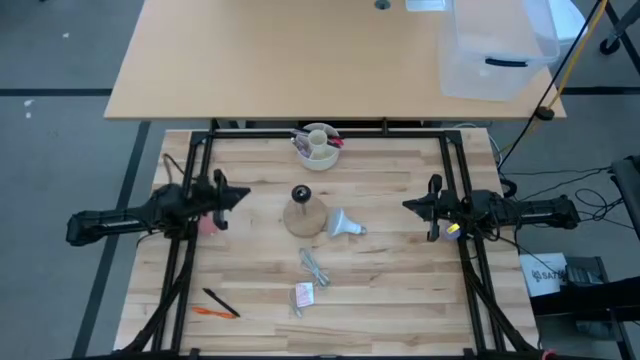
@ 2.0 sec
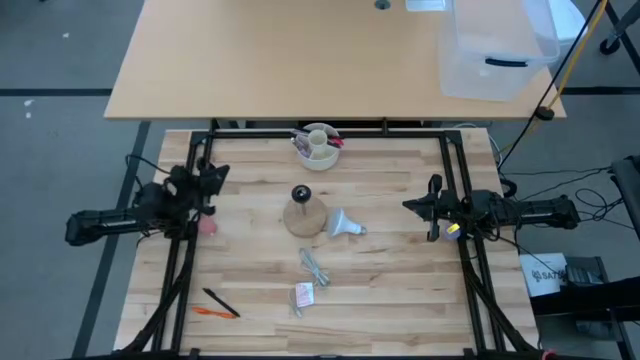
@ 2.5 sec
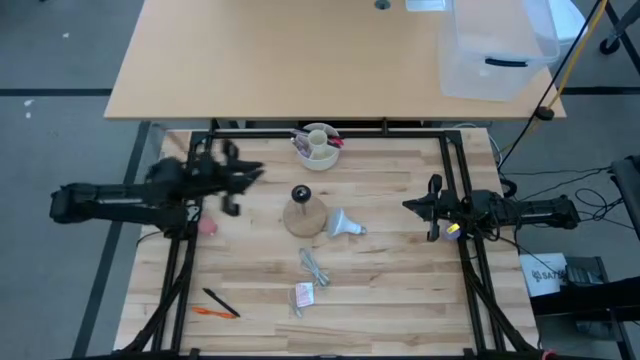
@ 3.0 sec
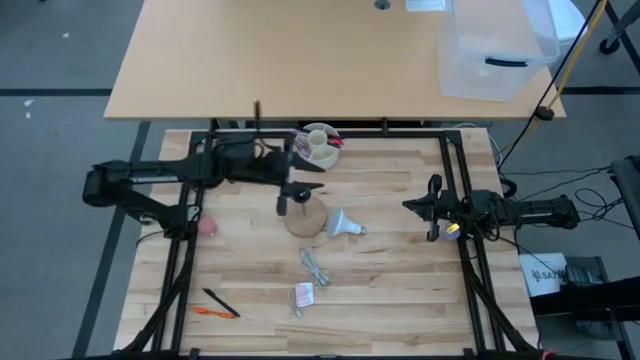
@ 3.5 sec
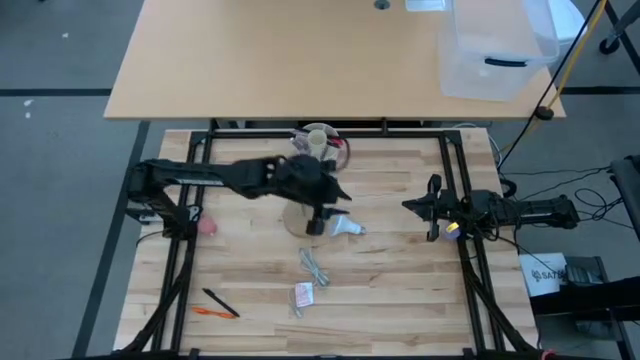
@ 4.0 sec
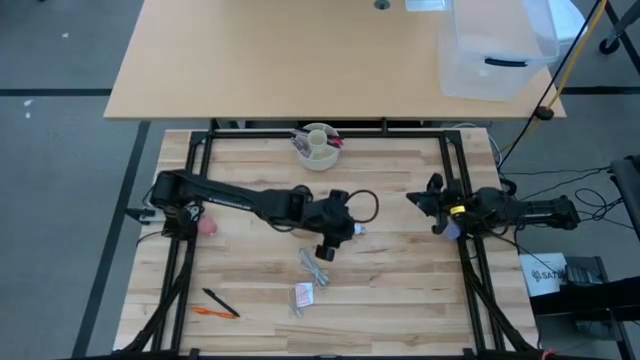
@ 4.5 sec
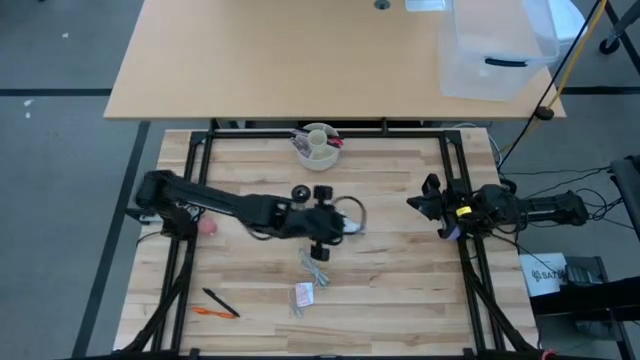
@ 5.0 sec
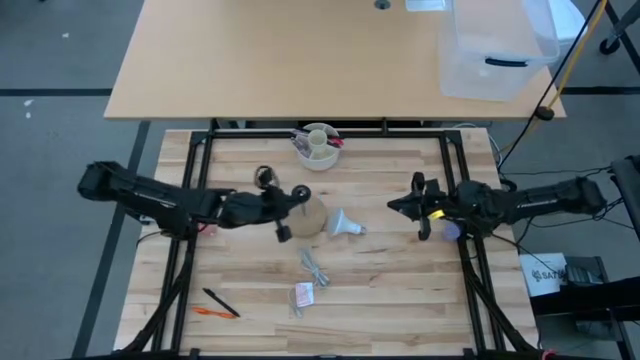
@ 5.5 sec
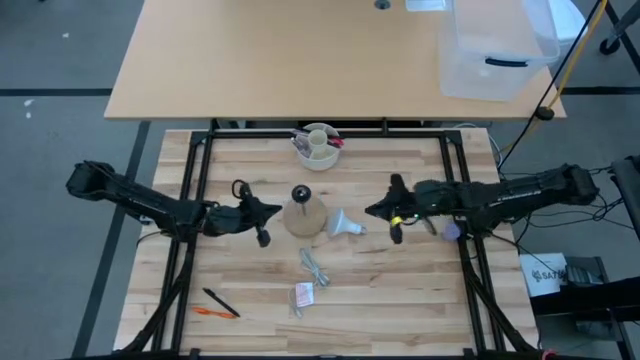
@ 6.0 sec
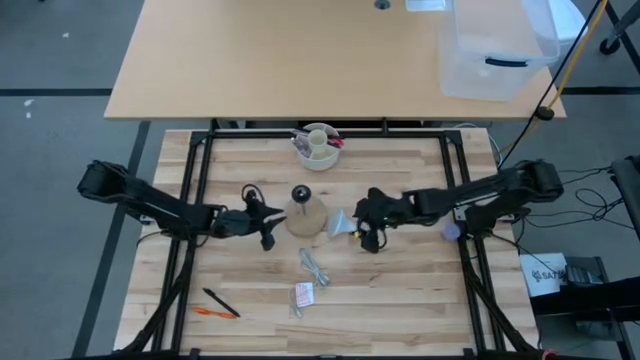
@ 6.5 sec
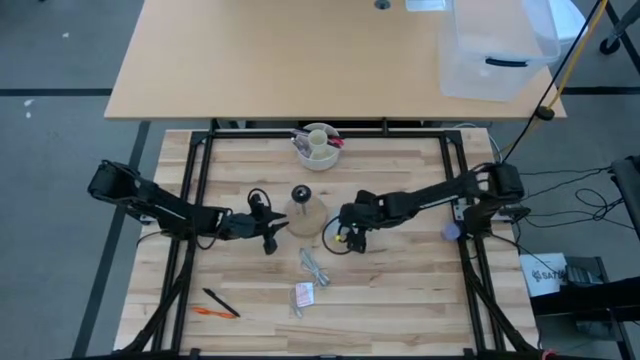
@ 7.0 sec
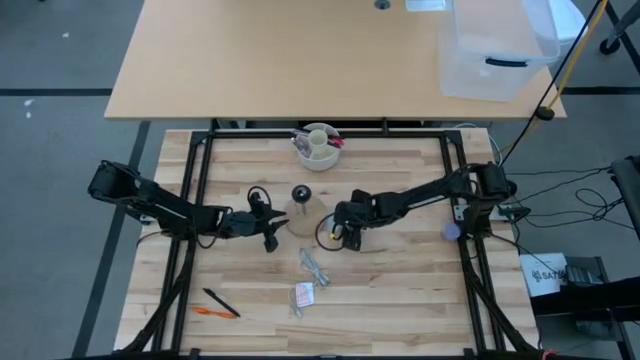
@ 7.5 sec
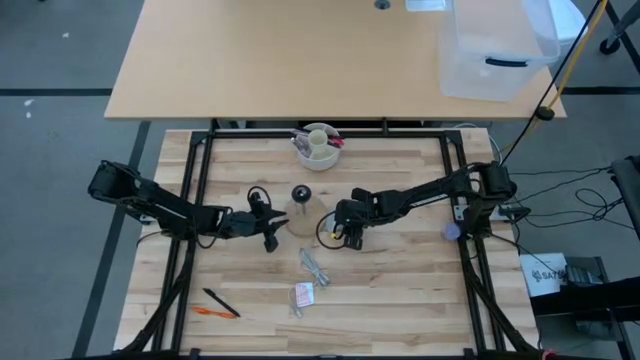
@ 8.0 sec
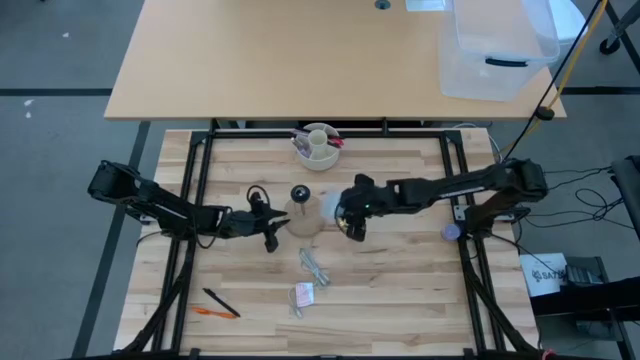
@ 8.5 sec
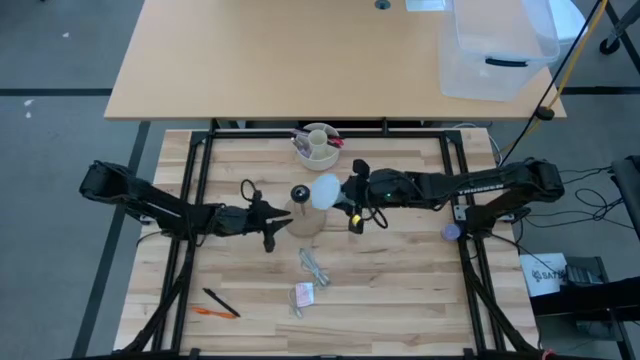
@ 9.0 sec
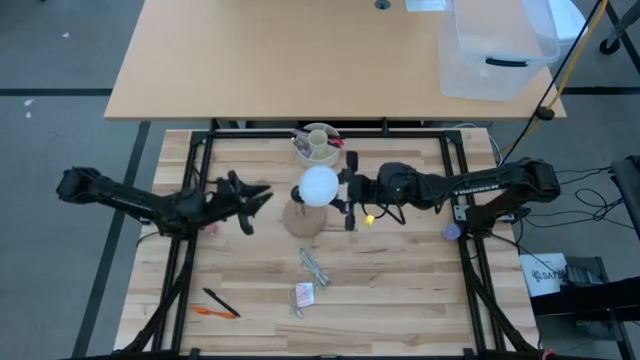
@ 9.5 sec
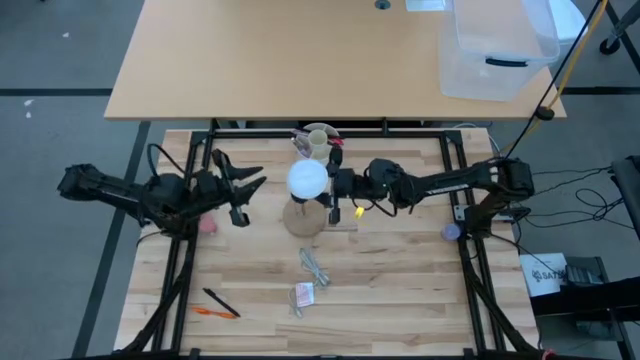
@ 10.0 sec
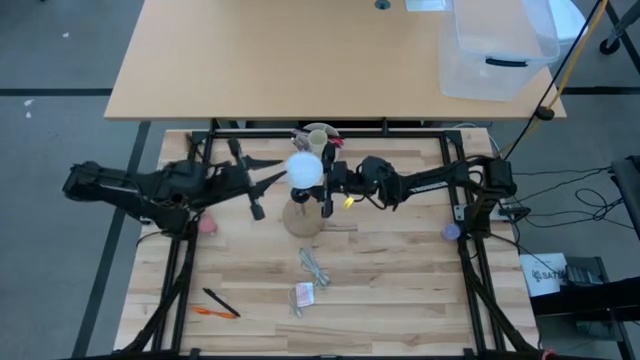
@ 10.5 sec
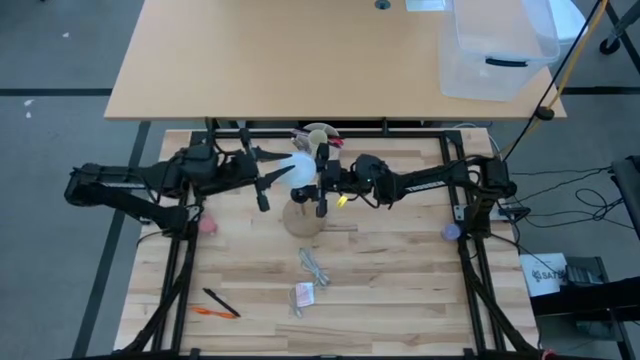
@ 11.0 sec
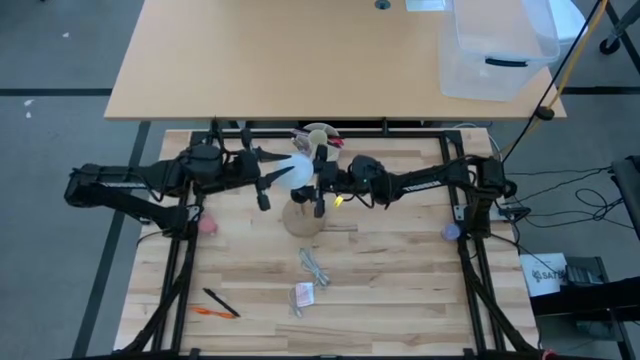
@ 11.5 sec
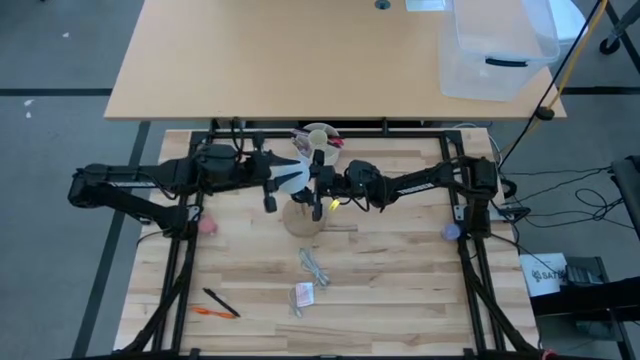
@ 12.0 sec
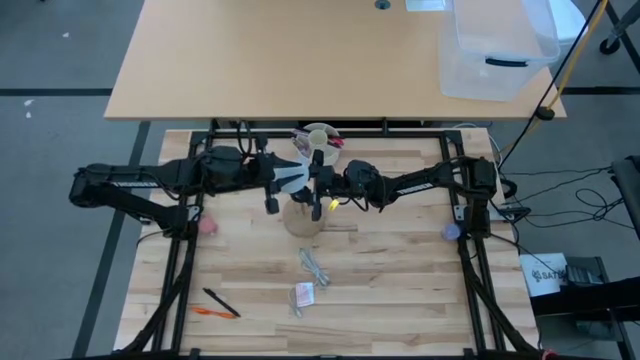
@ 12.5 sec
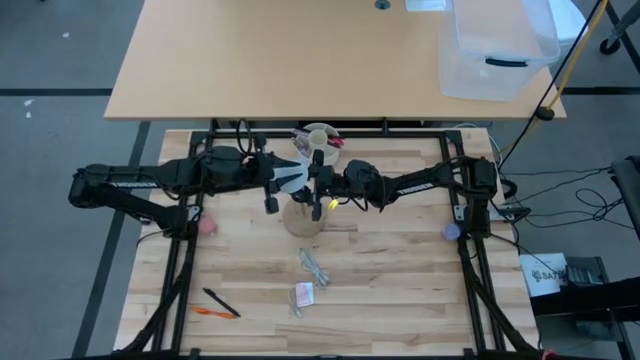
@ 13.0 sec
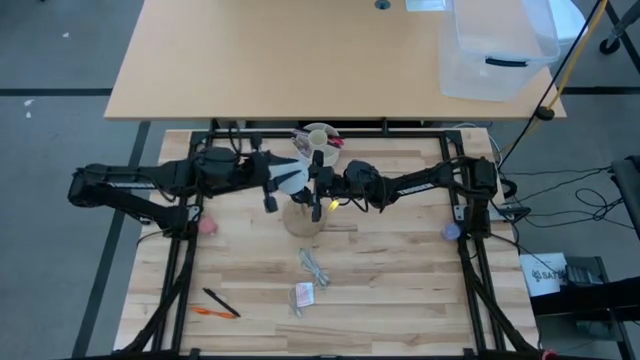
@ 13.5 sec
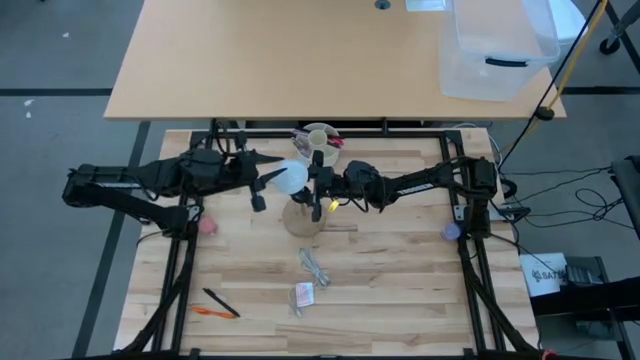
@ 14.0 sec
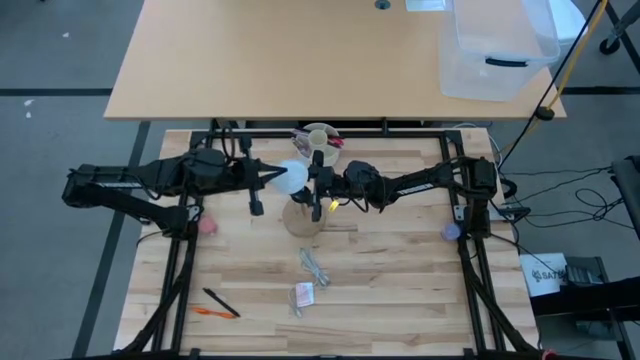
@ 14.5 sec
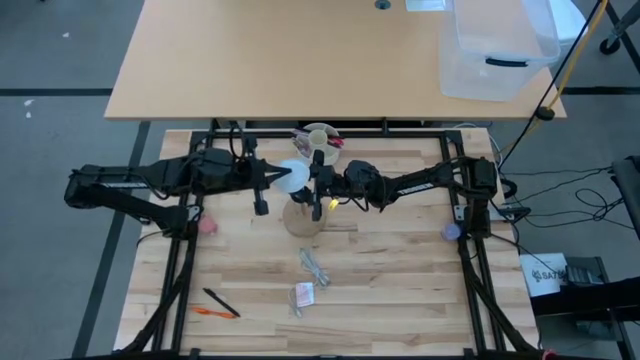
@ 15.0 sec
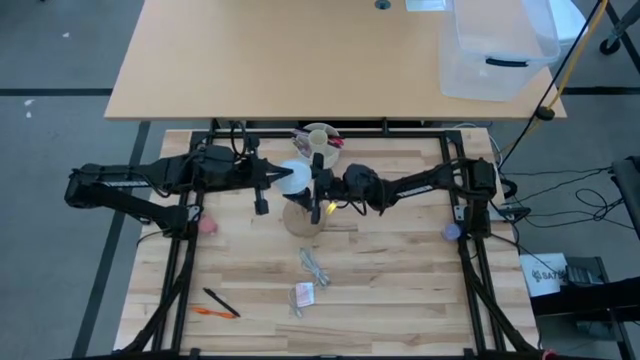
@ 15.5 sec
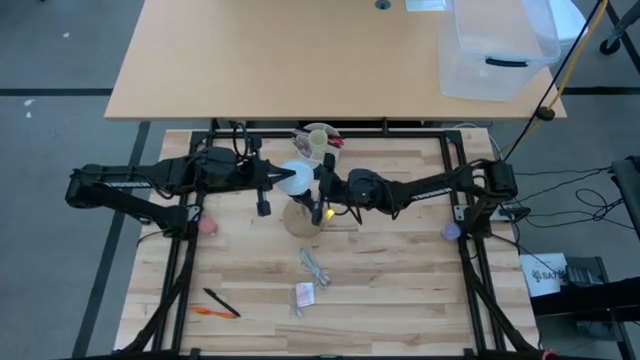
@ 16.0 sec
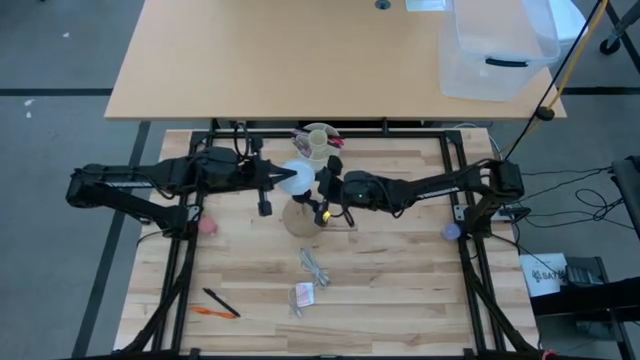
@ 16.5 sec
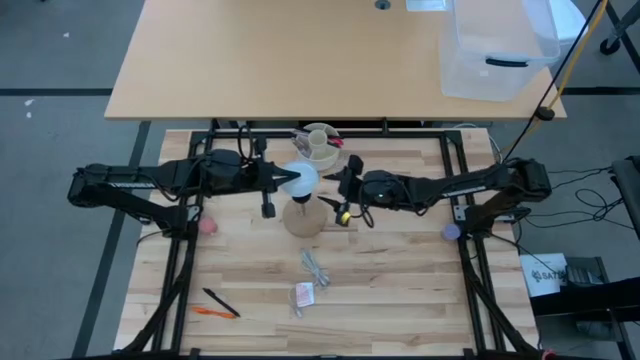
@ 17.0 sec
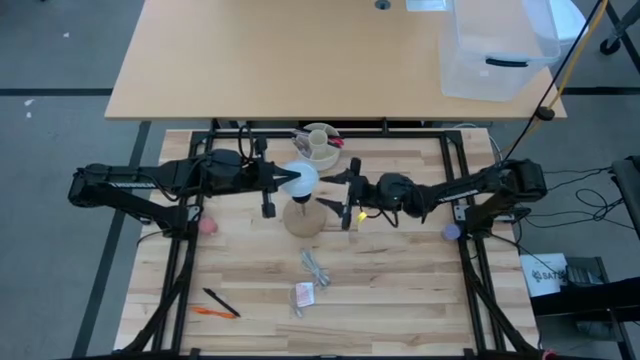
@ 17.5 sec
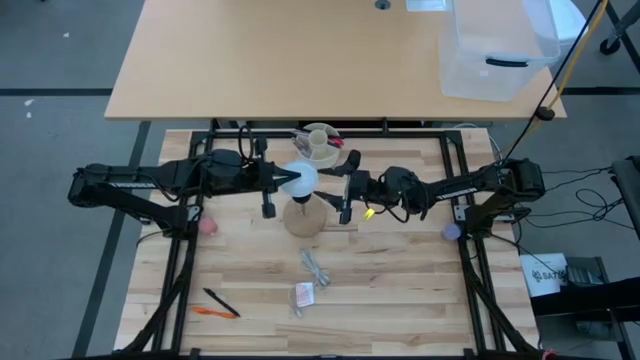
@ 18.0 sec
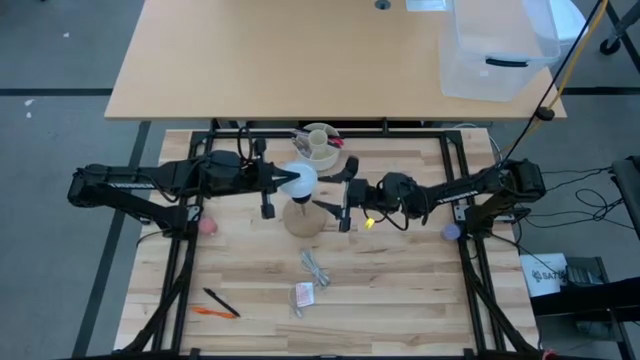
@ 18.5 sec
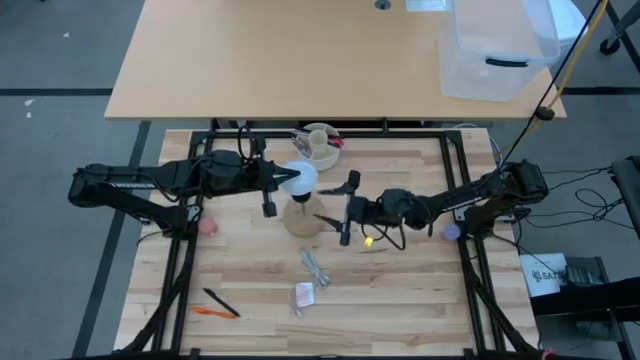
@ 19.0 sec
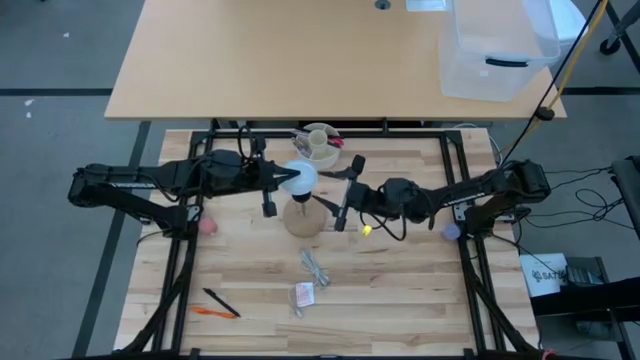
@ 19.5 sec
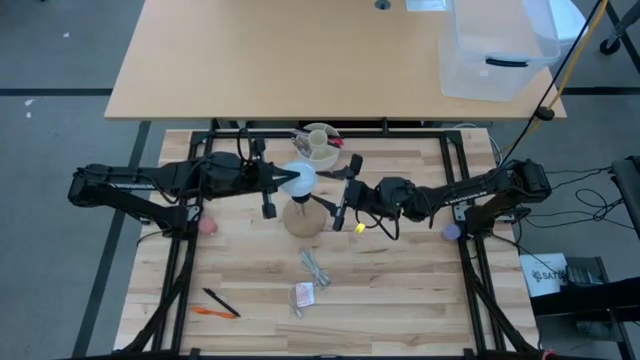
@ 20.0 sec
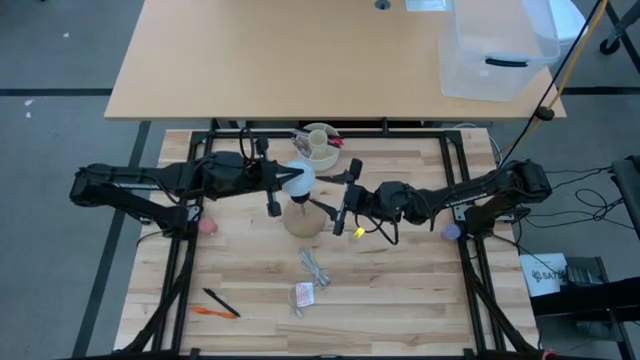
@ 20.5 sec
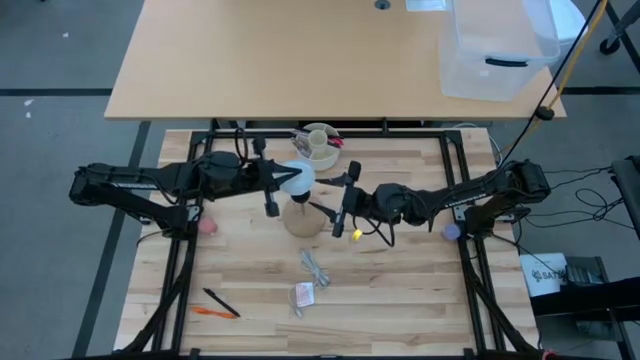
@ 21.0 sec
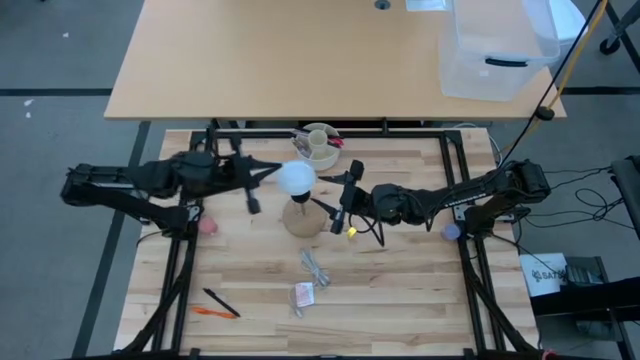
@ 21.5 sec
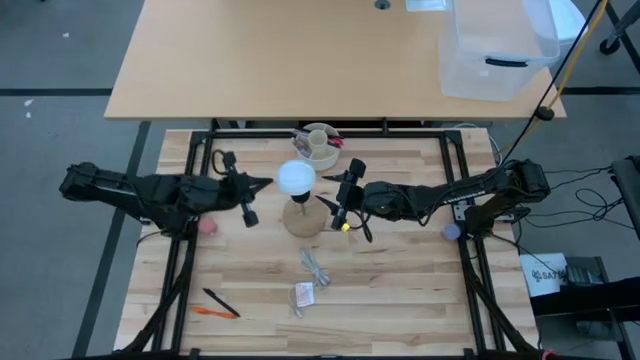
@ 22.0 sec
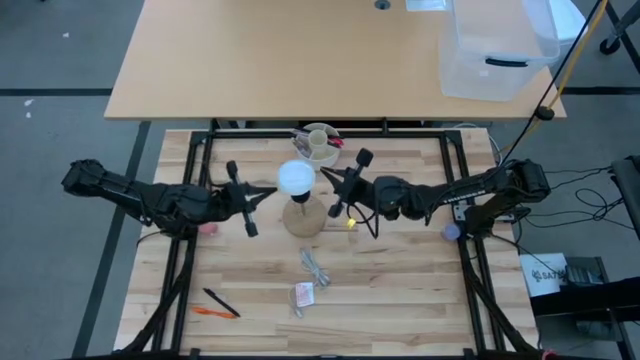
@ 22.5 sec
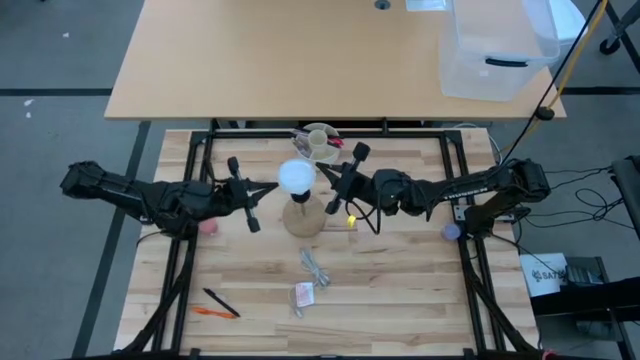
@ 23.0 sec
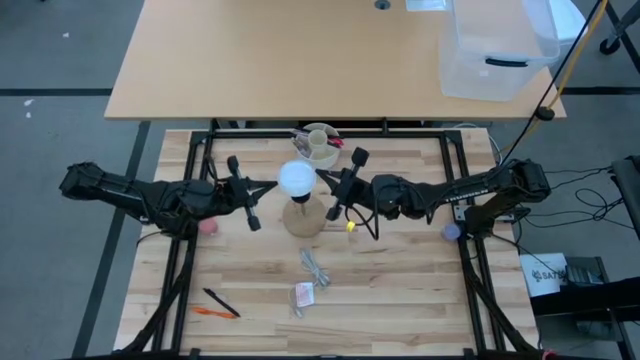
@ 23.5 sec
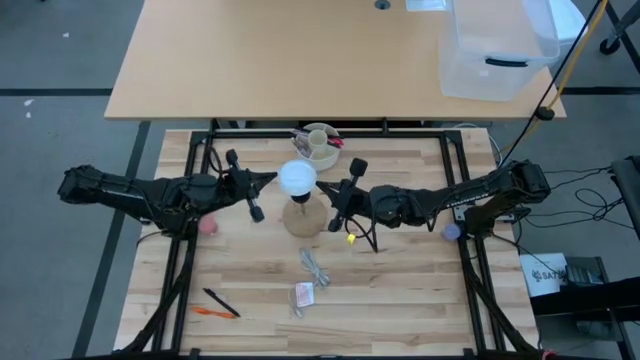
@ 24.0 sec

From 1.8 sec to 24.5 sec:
Task: Screw lightbulb
Insert the lightbulb into the wooden lamp
